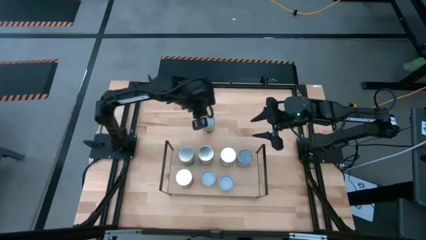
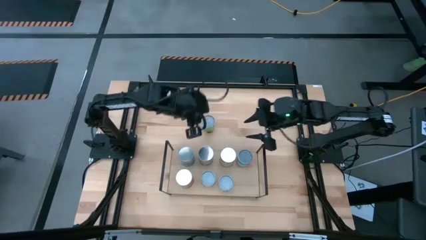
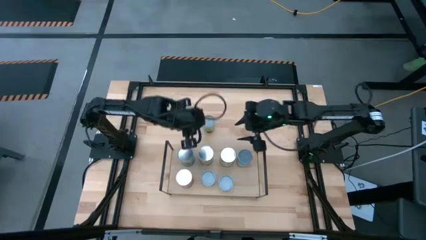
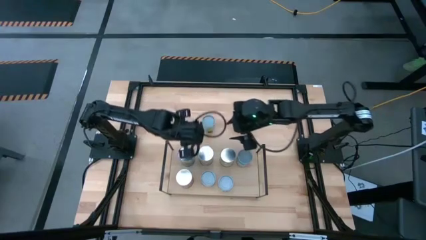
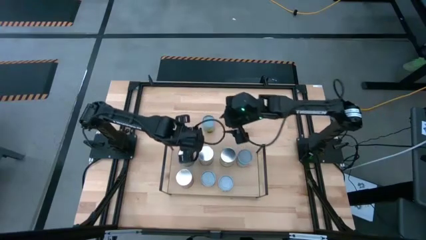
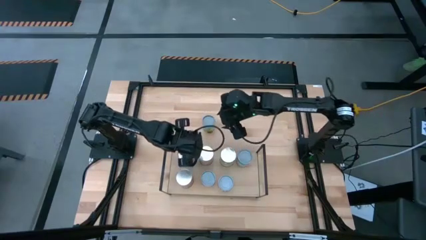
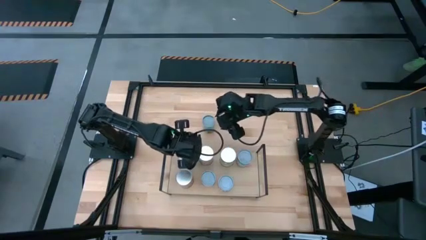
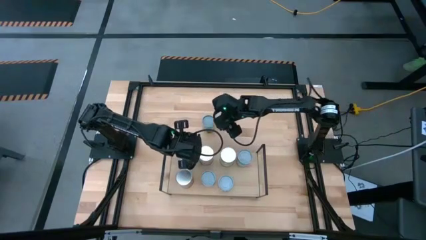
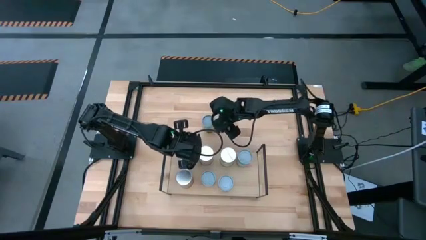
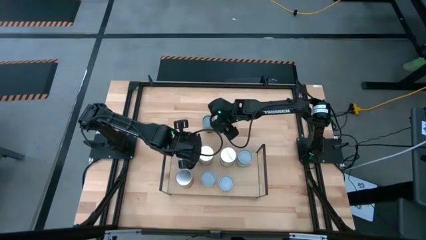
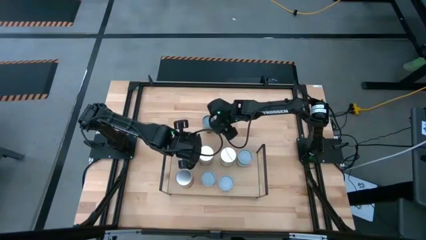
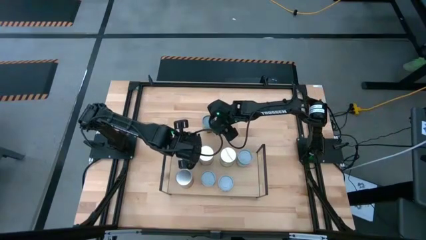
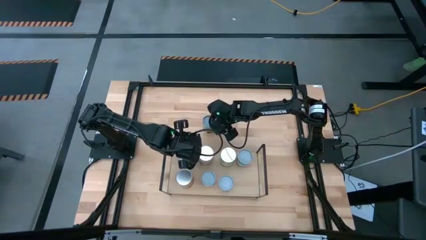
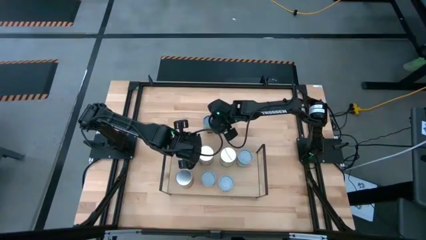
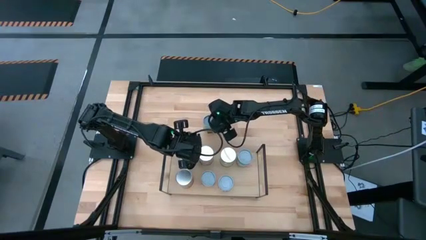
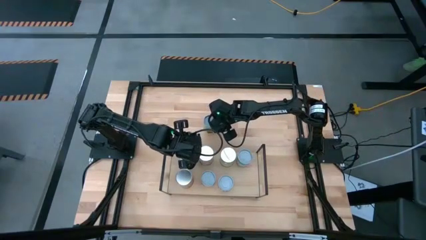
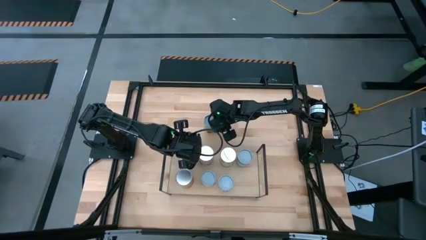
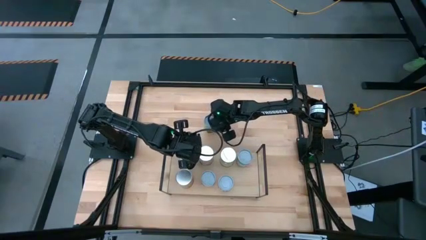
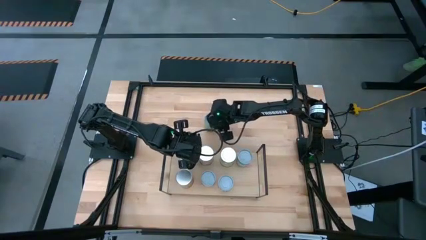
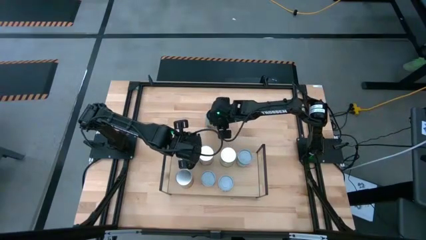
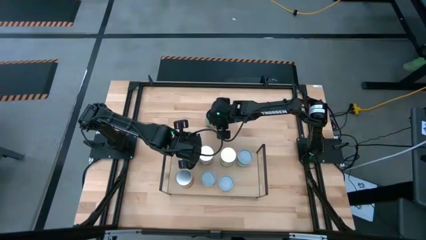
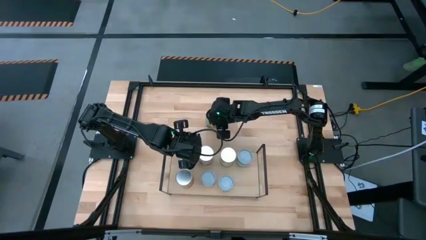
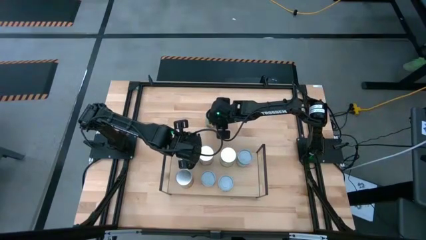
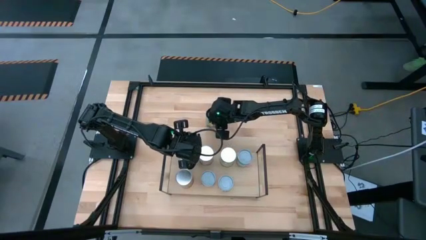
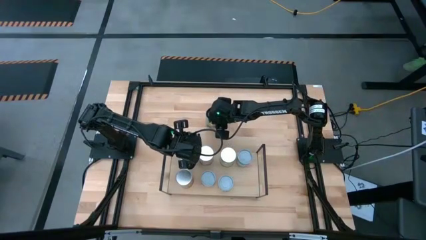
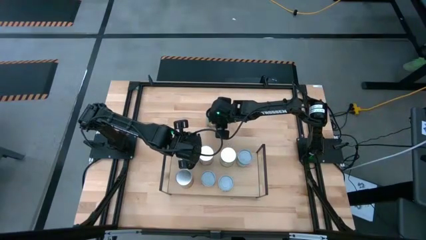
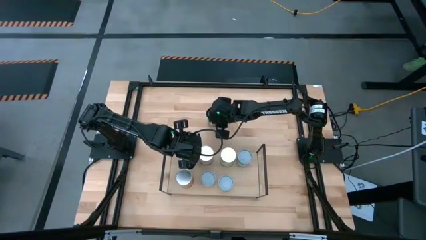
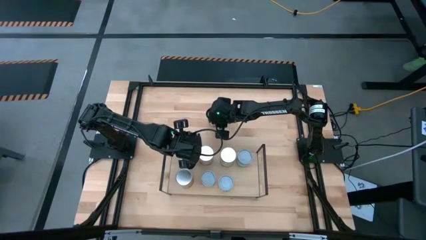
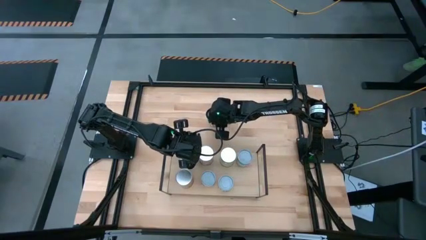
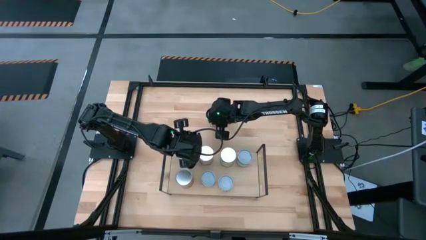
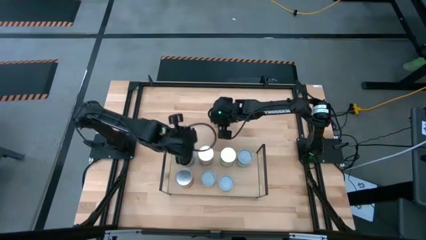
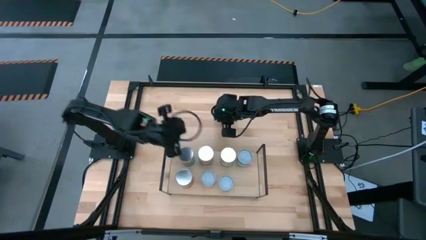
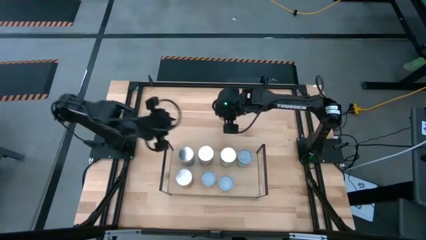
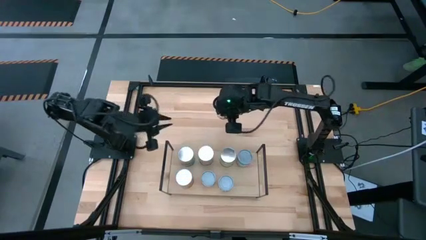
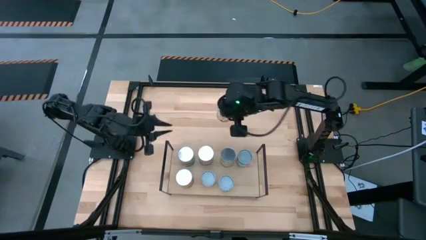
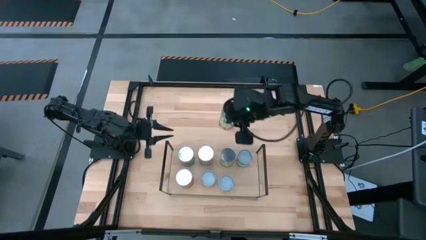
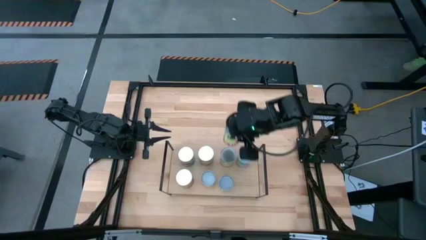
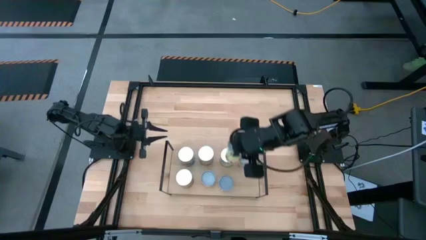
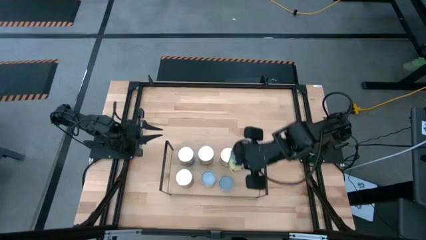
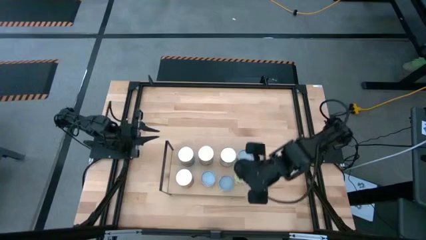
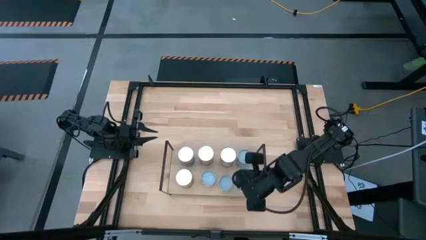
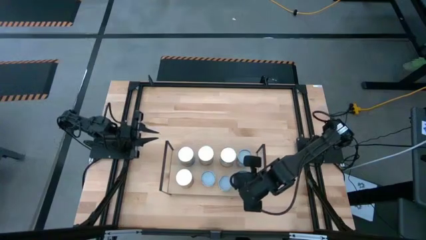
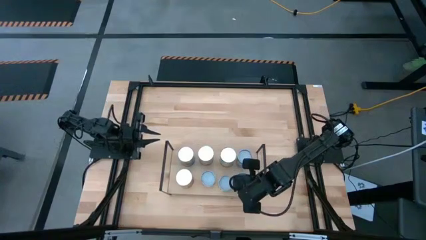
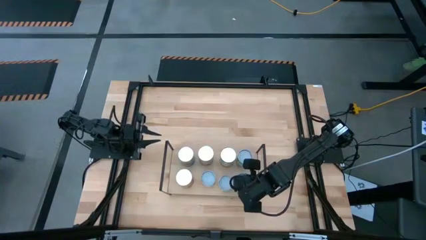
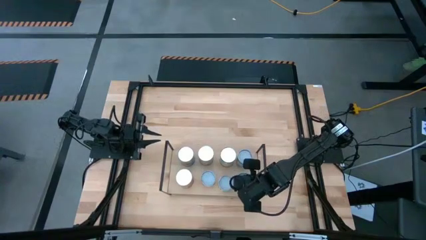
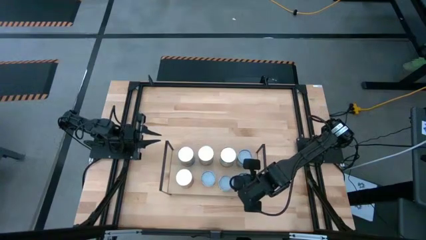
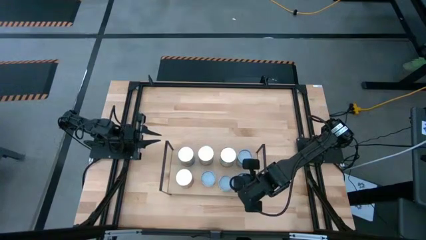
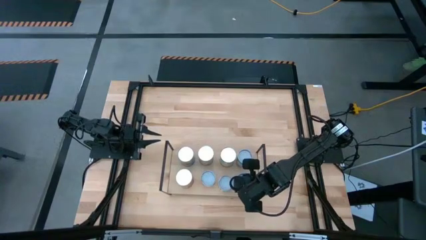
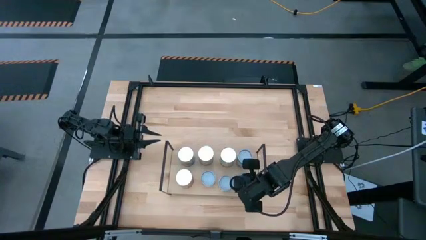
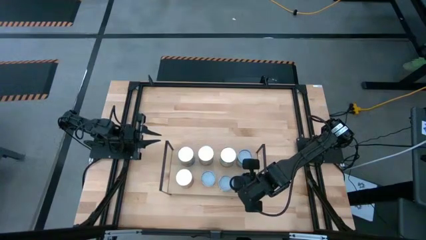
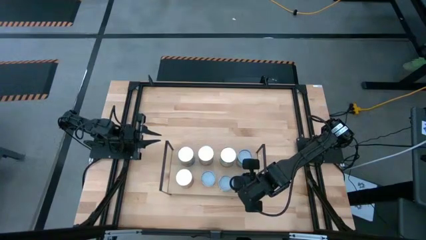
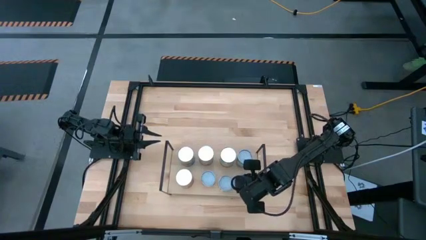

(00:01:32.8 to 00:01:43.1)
Task: Pick and place cans onto a shelf
Put the green yellow canned spaghetti sauce on the shelf

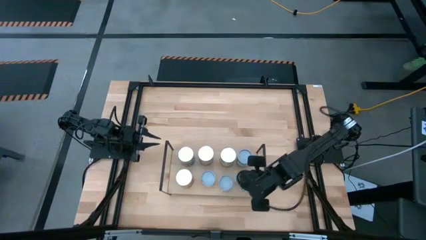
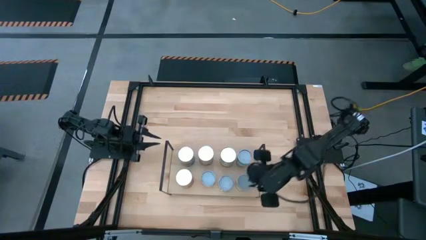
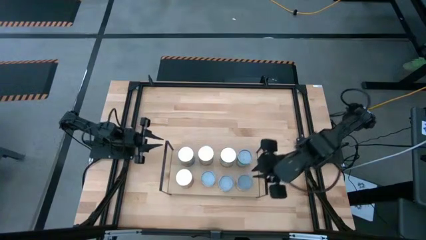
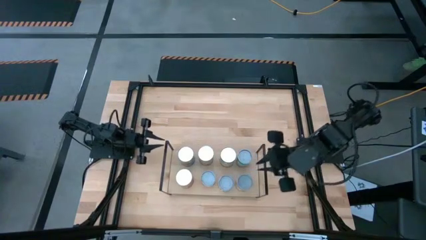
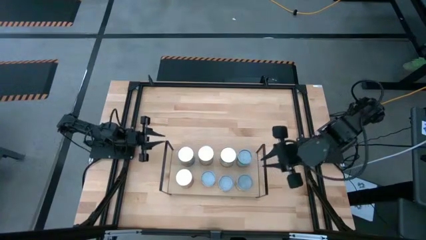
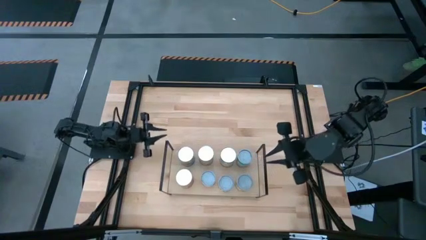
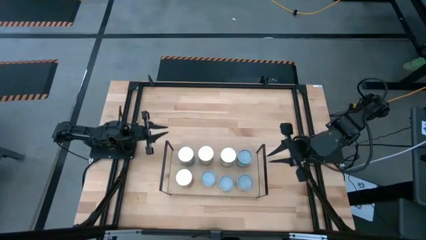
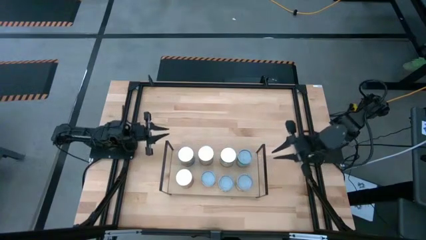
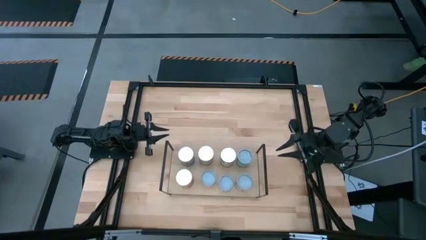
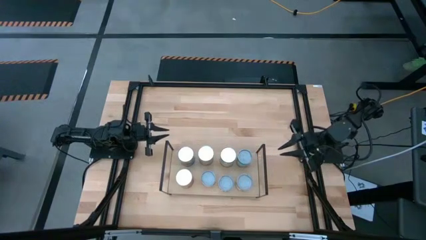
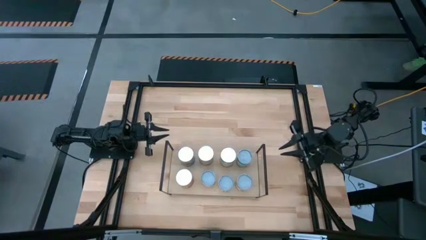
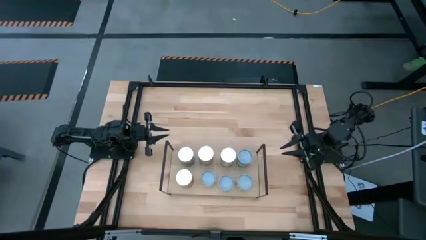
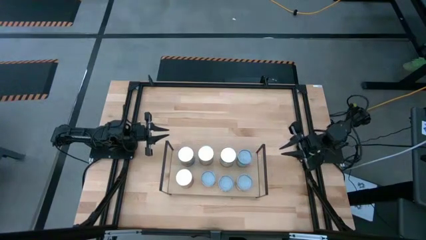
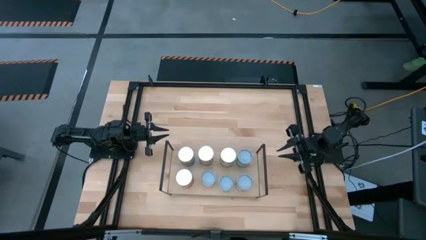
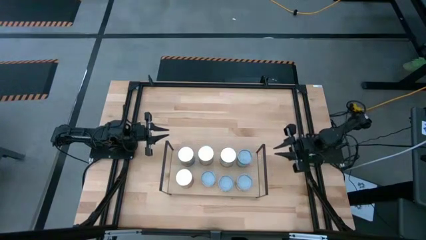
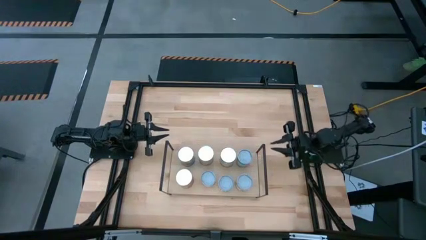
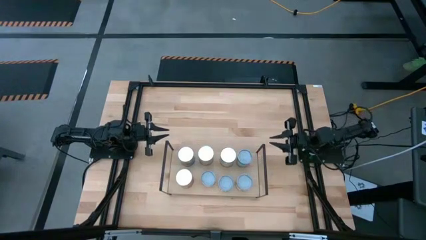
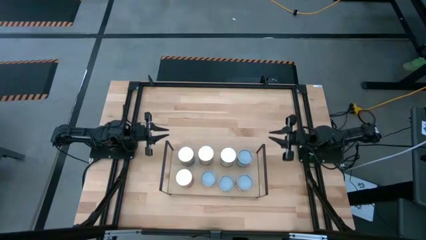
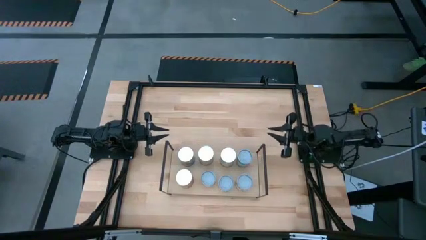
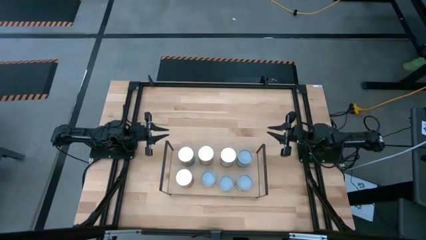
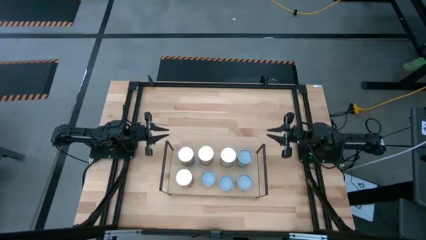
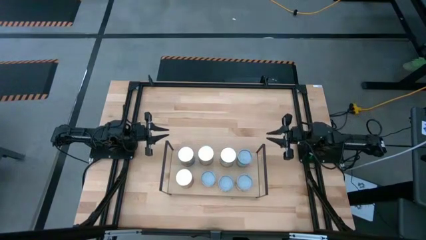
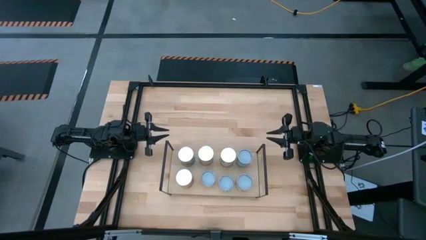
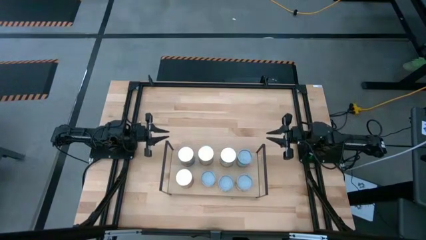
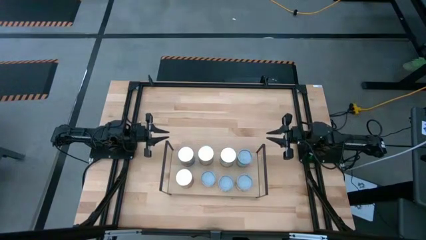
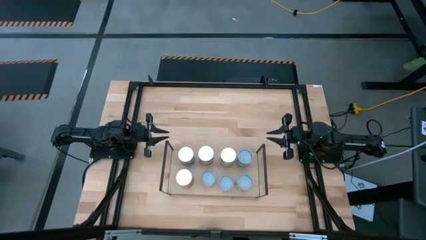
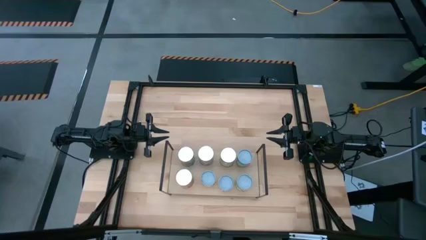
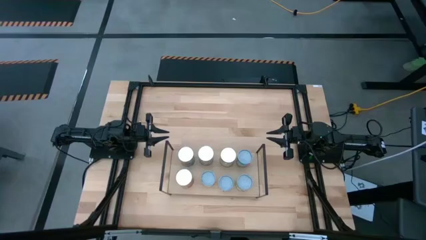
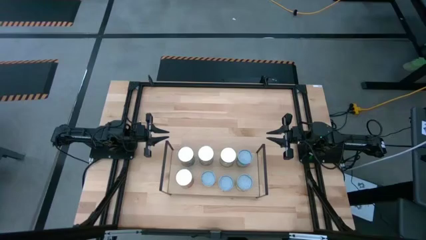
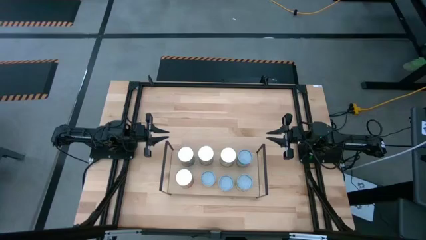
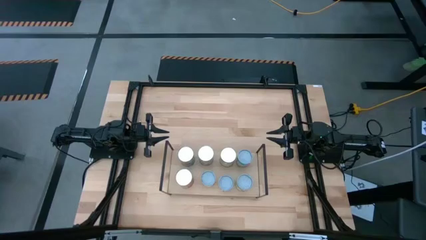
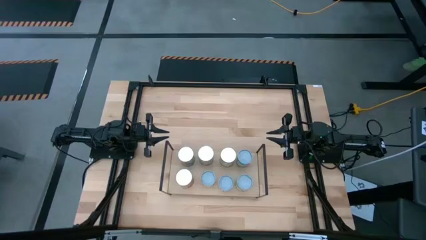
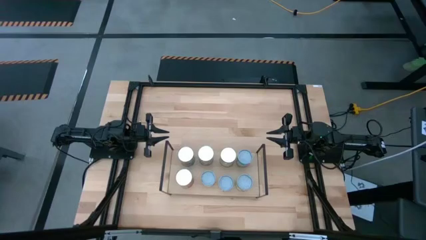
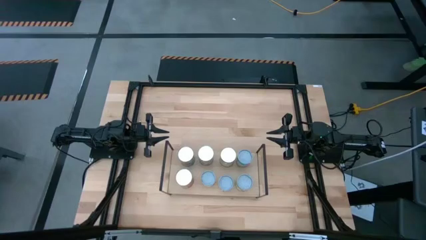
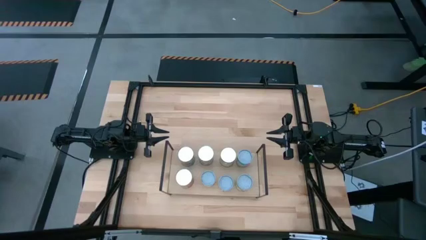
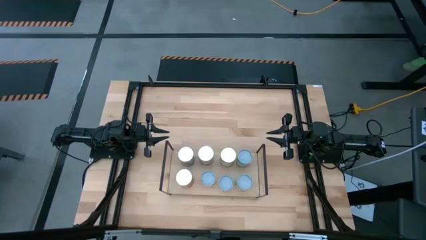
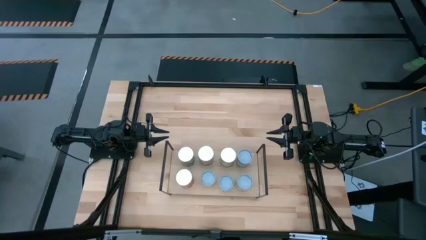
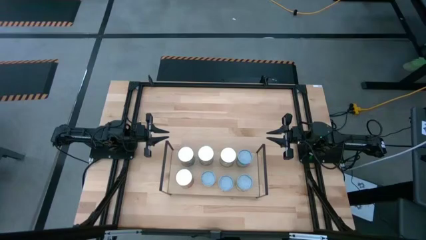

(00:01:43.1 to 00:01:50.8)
Return to Home Position
